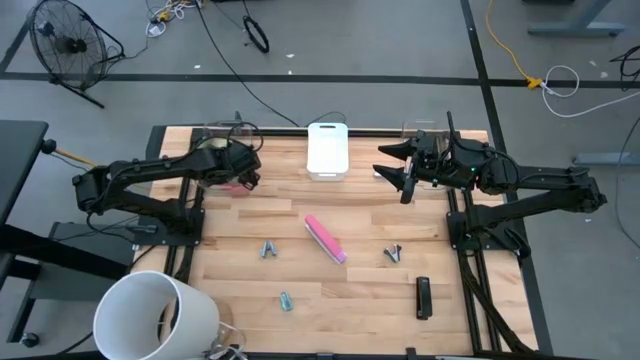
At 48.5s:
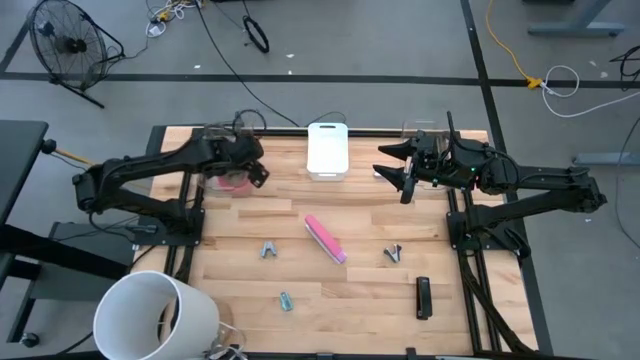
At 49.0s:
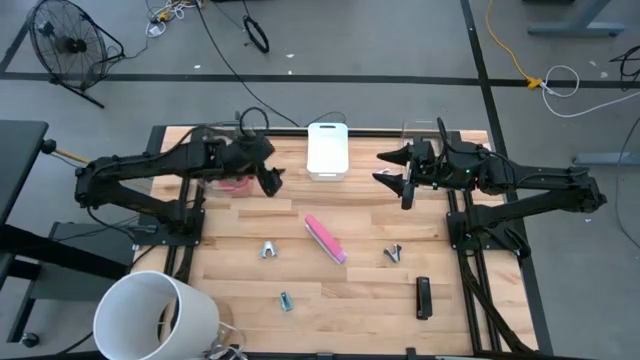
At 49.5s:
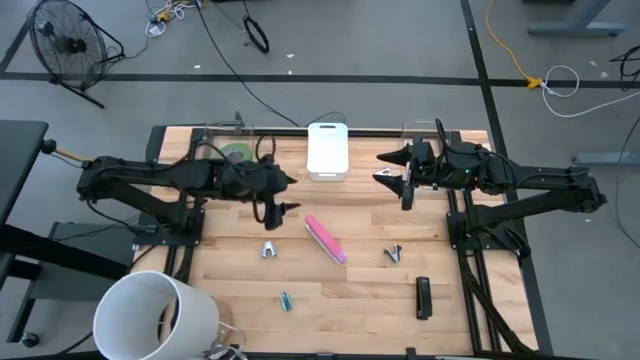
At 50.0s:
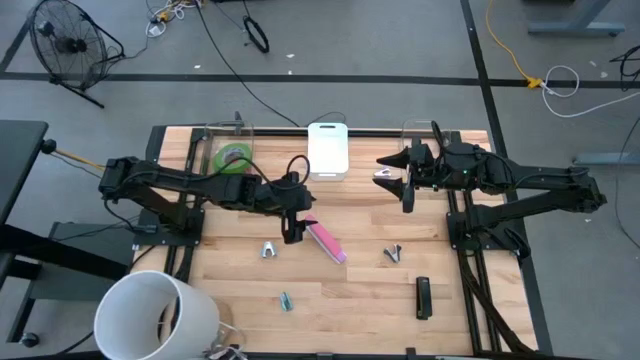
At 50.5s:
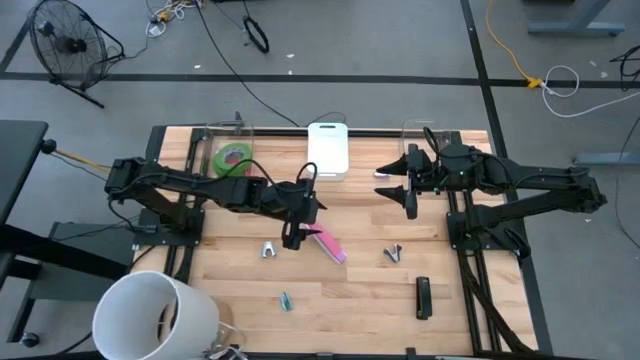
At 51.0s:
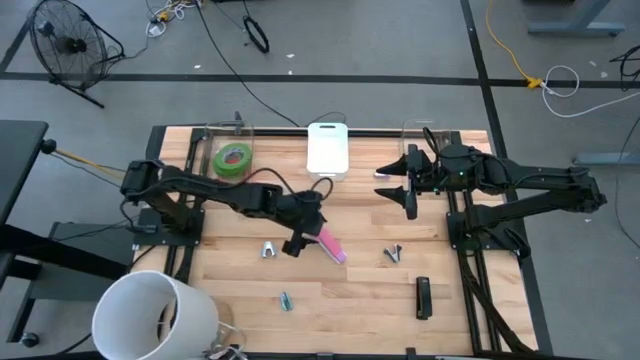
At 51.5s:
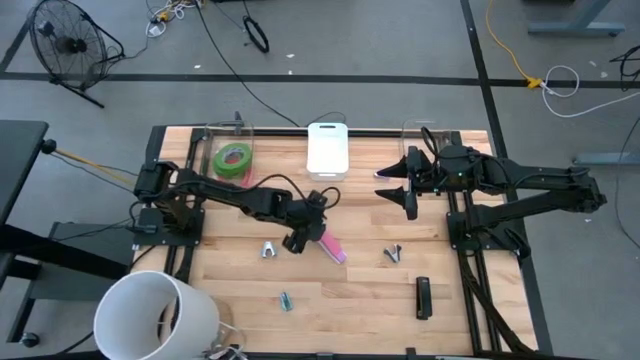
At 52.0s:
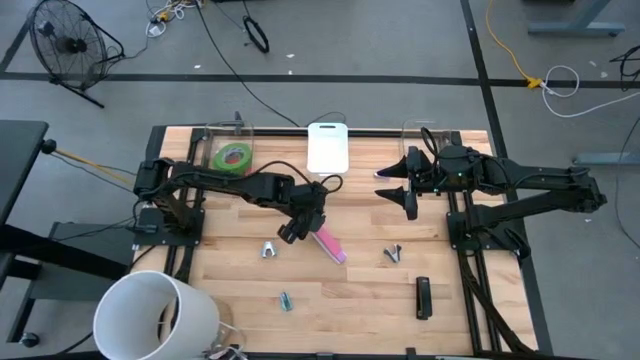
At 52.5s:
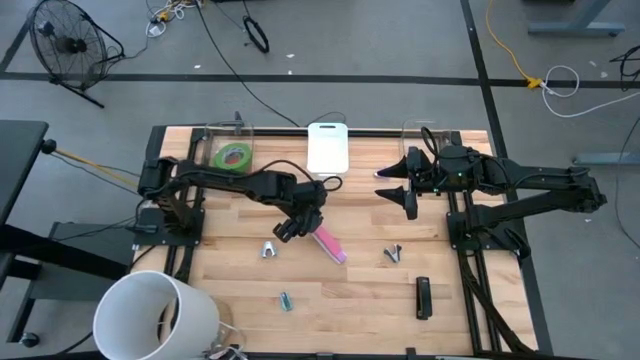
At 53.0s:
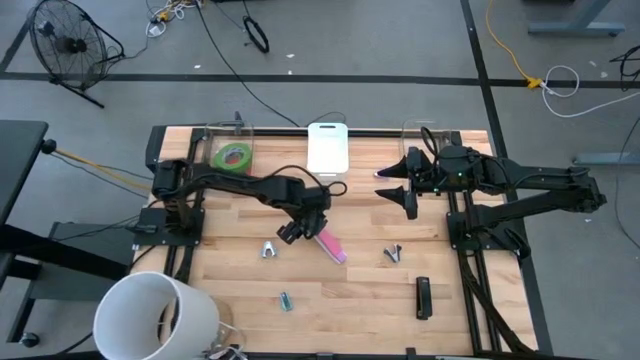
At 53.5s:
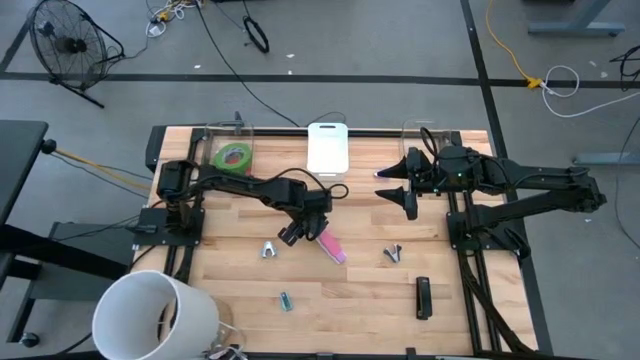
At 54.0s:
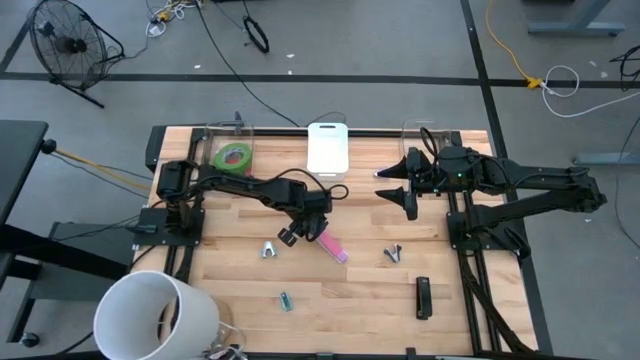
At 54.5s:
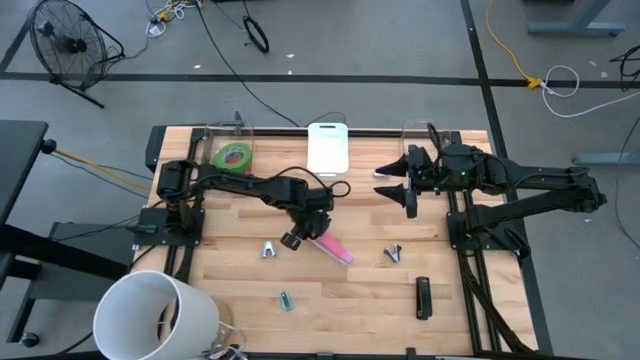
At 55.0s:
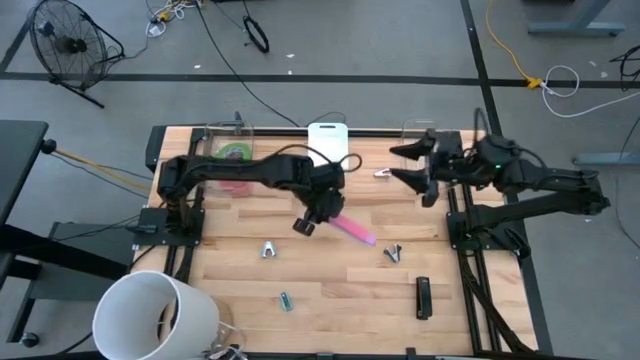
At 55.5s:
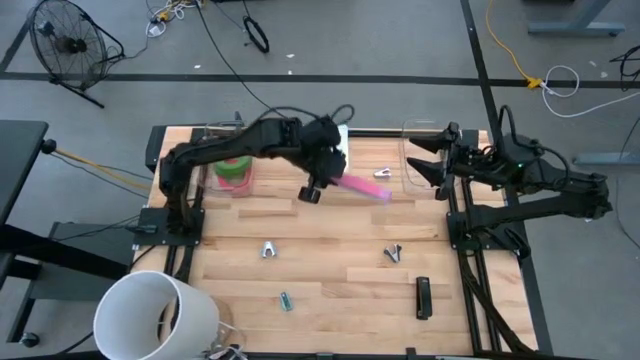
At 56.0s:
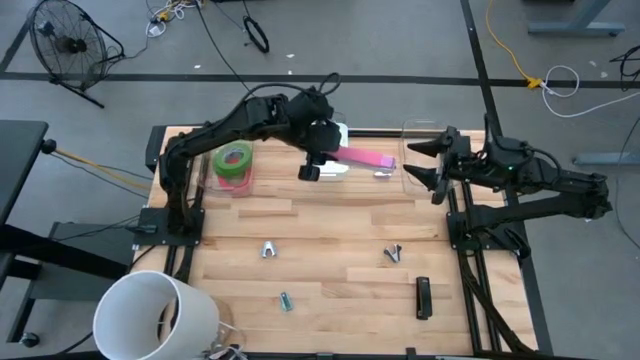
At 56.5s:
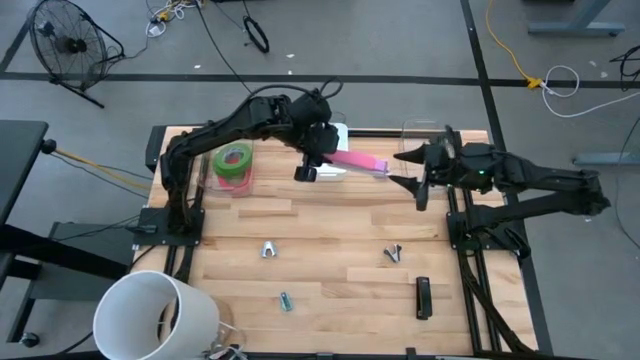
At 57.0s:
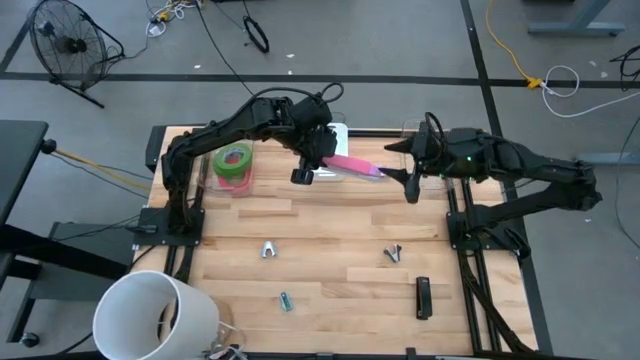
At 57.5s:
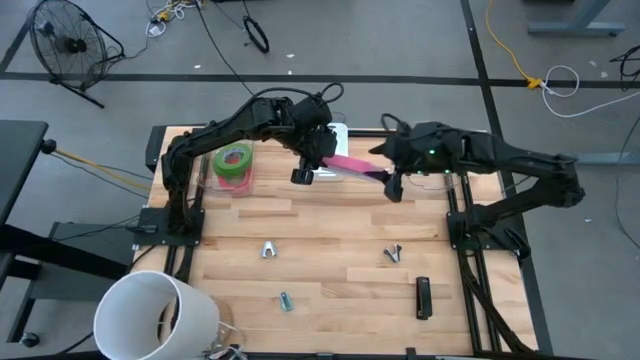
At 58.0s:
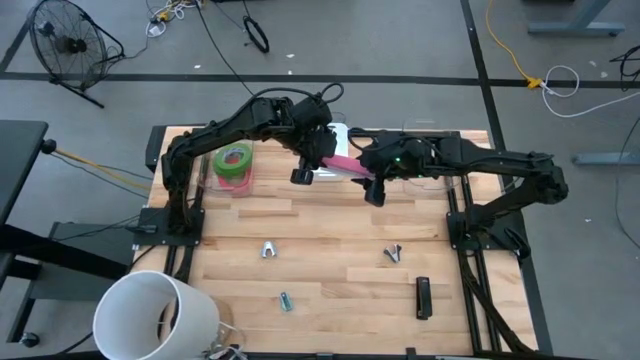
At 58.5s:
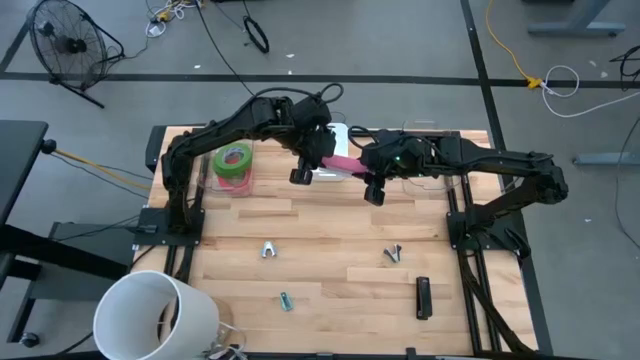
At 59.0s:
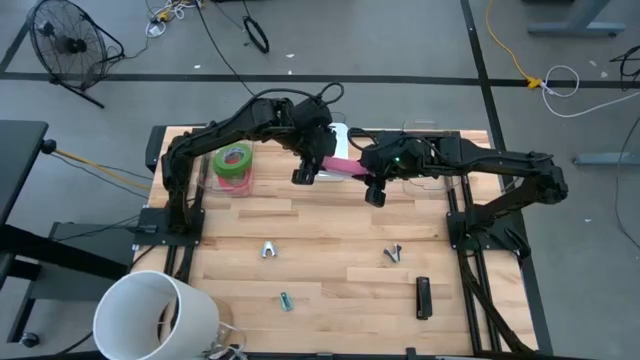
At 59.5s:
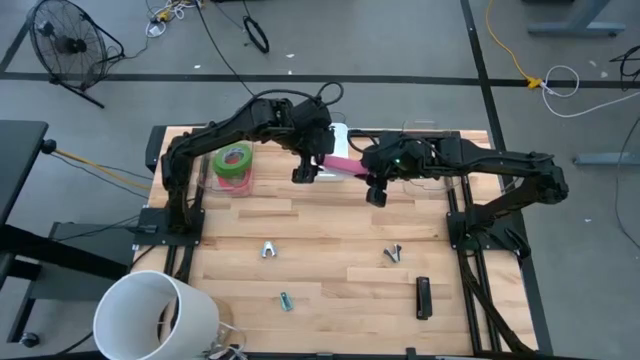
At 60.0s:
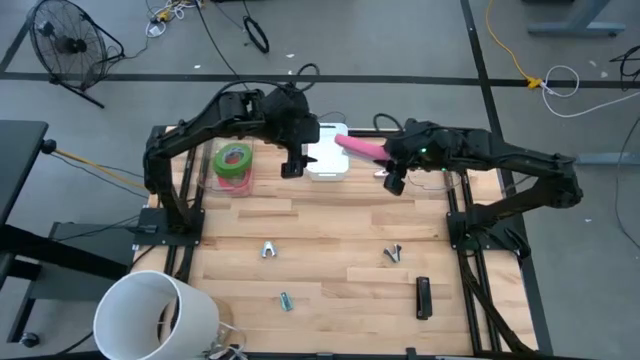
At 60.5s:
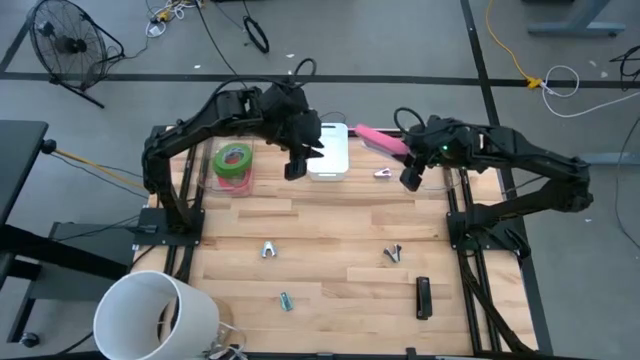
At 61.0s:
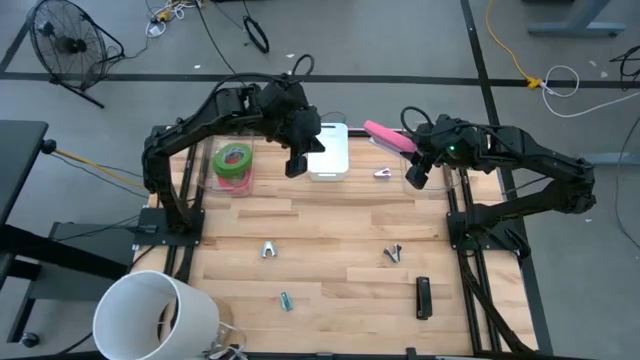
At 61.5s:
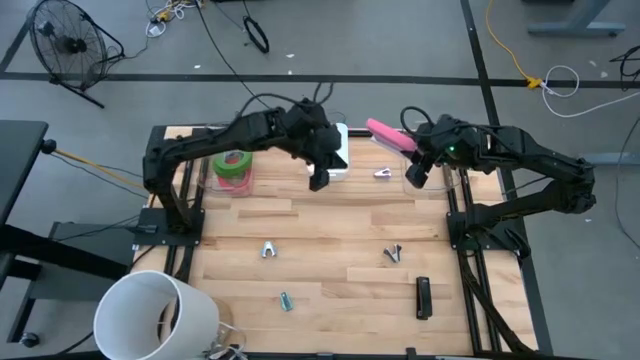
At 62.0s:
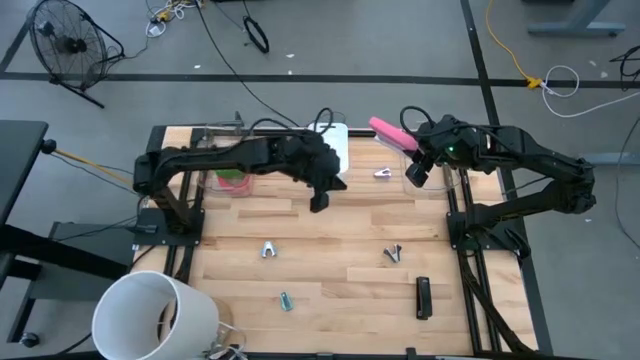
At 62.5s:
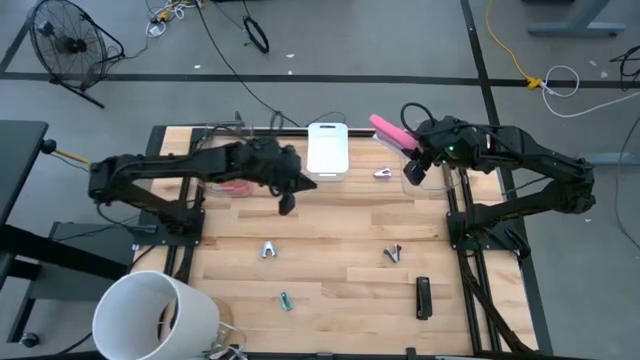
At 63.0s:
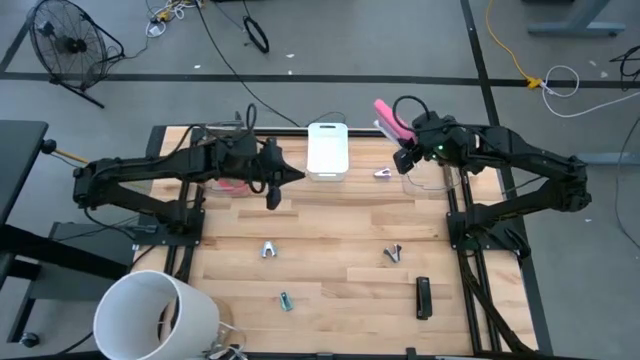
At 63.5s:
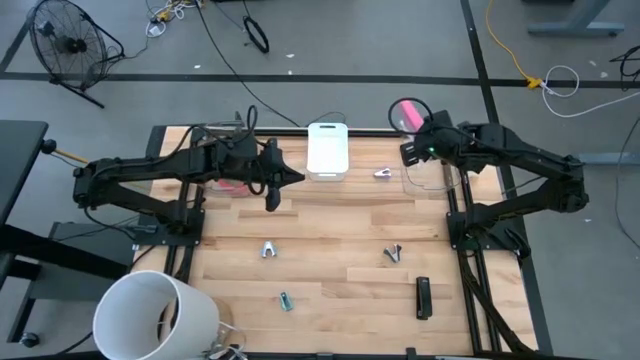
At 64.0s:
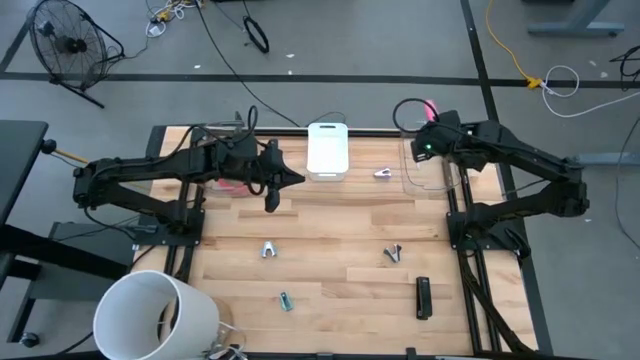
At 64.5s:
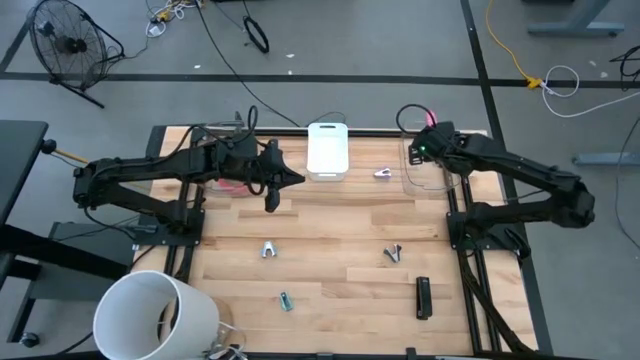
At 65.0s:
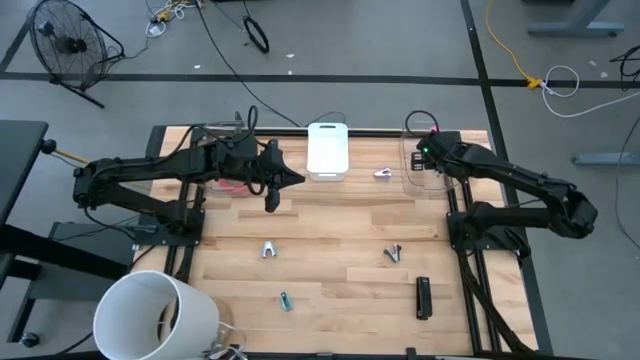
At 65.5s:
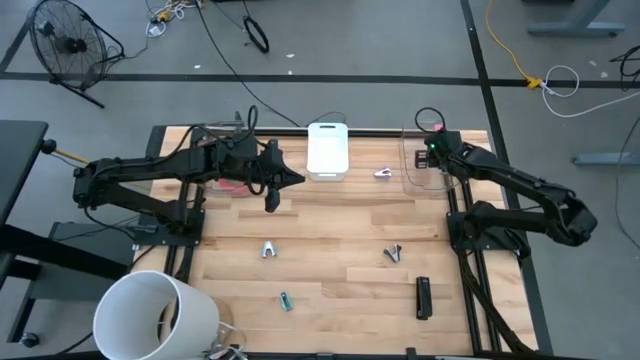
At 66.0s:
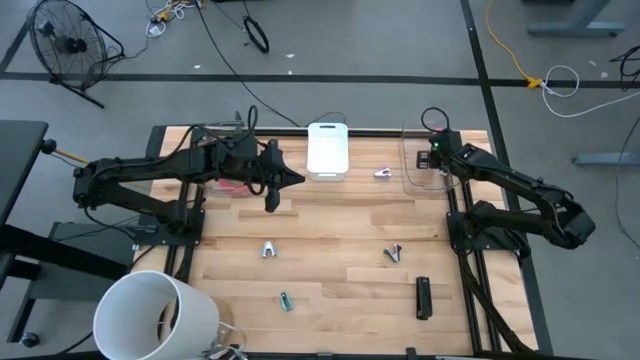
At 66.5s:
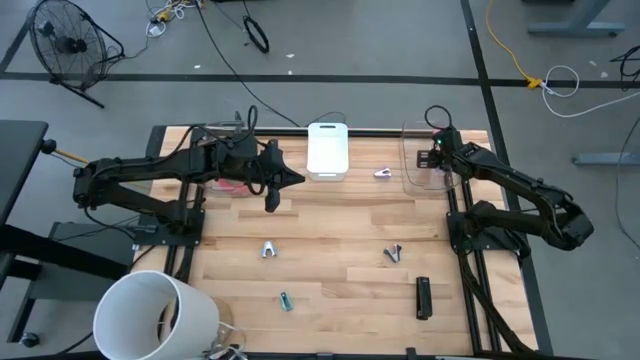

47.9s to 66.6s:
Task: Pick and place Stapler, Stapler remover, tape
Put the pink stapler into the right transparent bin

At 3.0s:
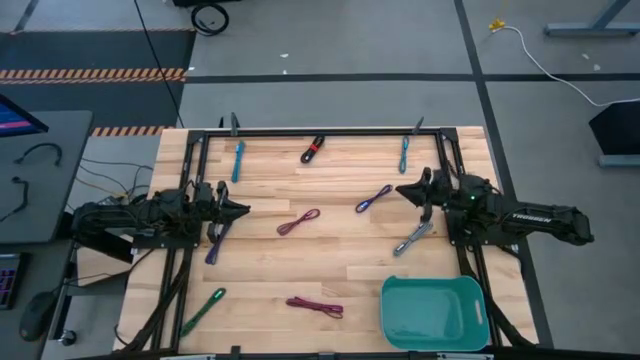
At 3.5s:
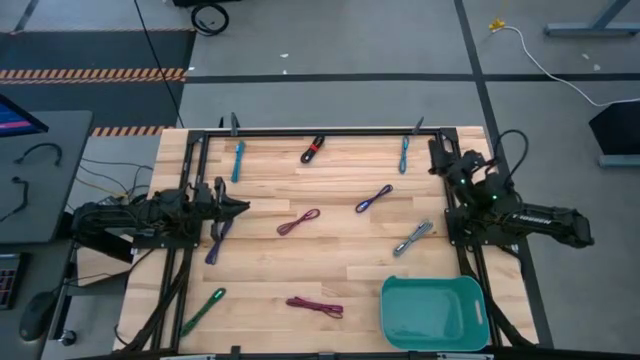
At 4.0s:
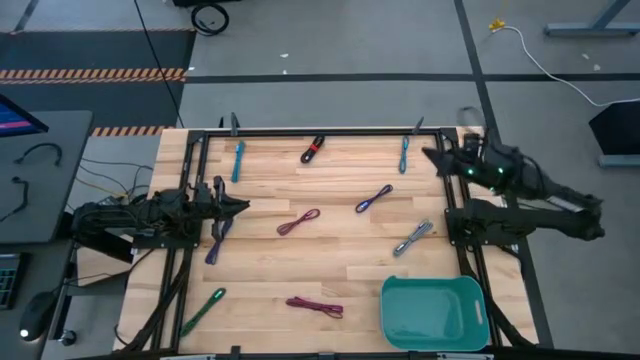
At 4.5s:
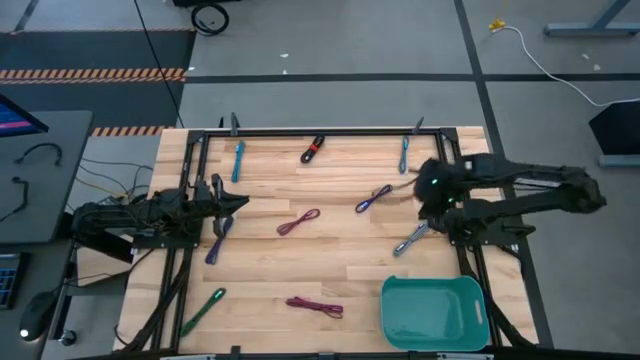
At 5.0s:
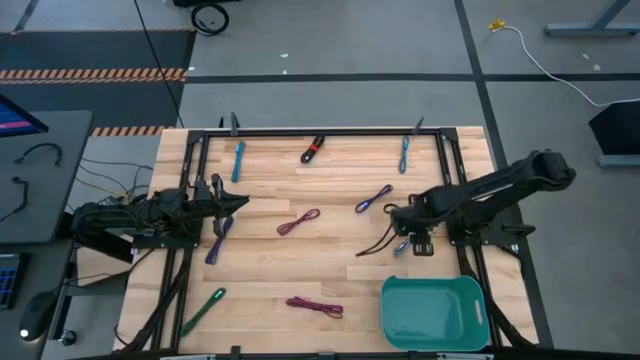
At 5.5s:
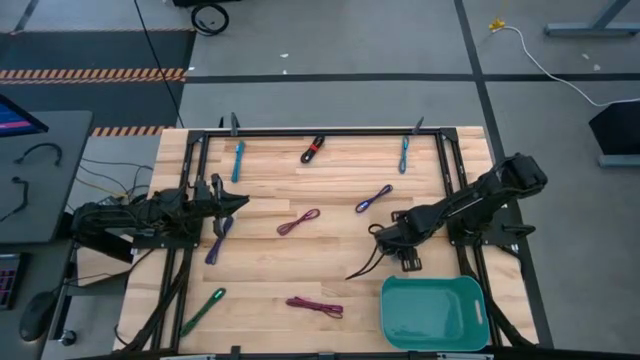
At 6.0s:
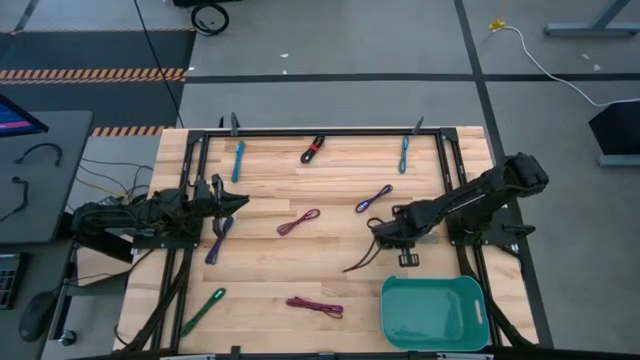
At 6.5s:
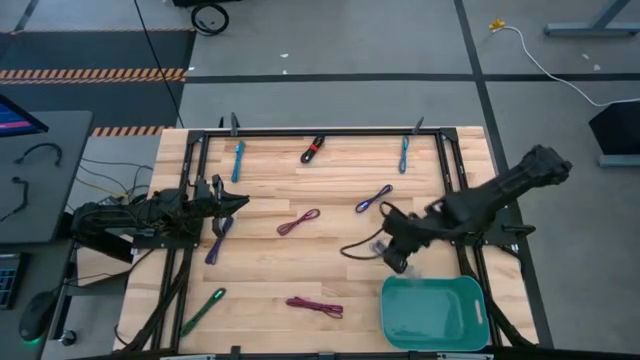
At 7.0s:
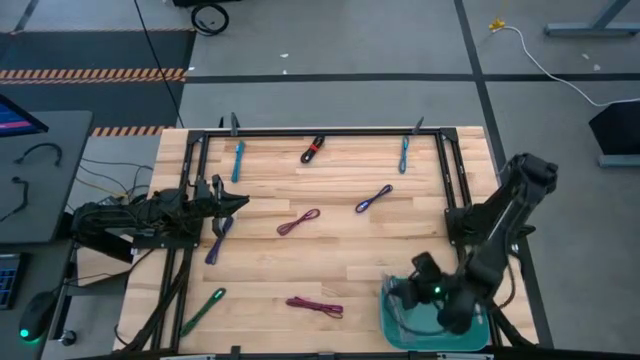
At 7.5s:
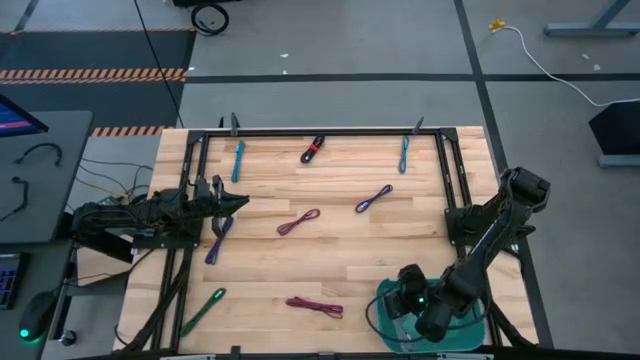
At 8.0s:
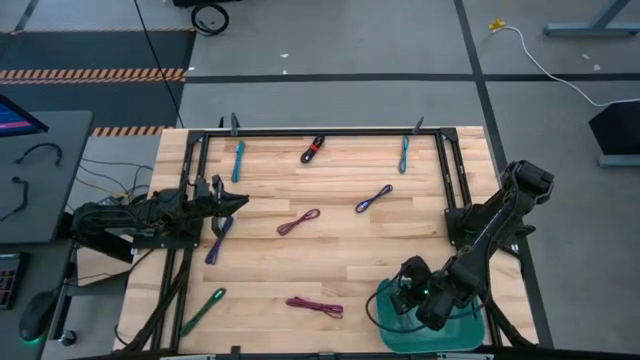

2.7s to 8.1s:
Task: Pick and place USB-C Cables
Put the white charger cable into the green bin
